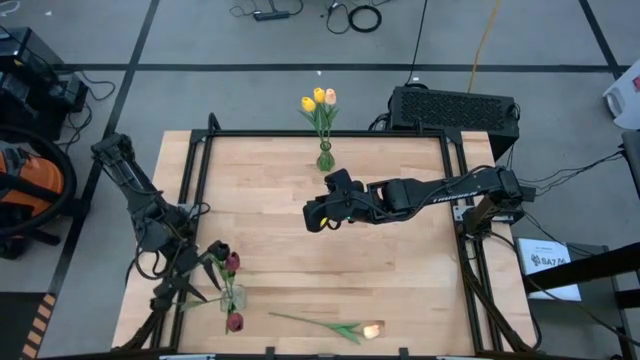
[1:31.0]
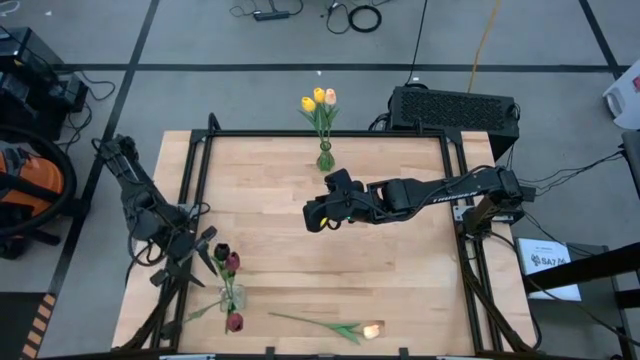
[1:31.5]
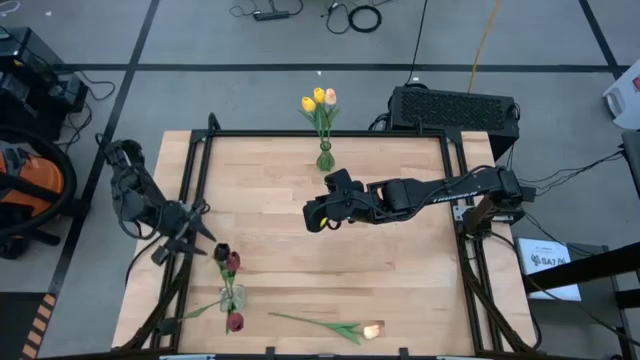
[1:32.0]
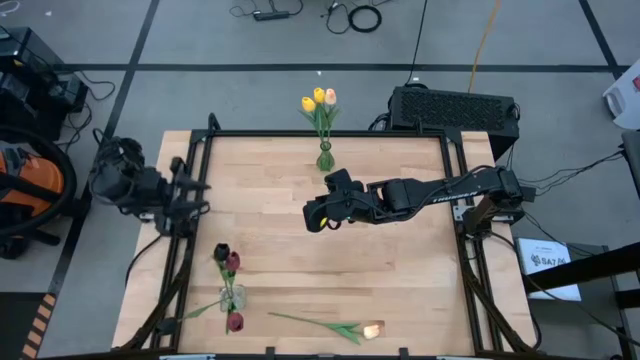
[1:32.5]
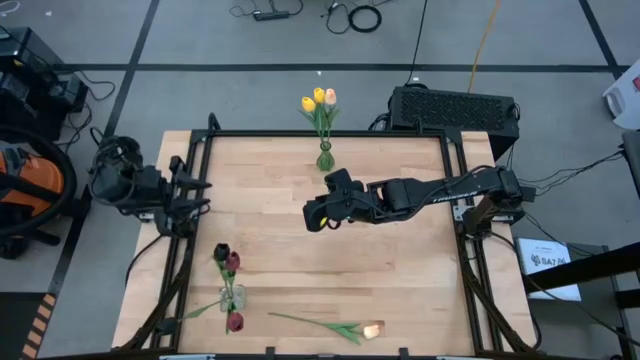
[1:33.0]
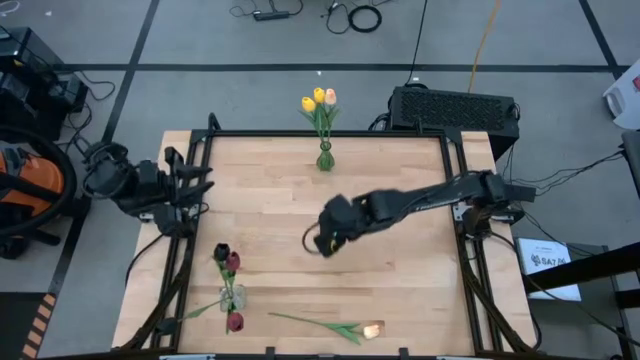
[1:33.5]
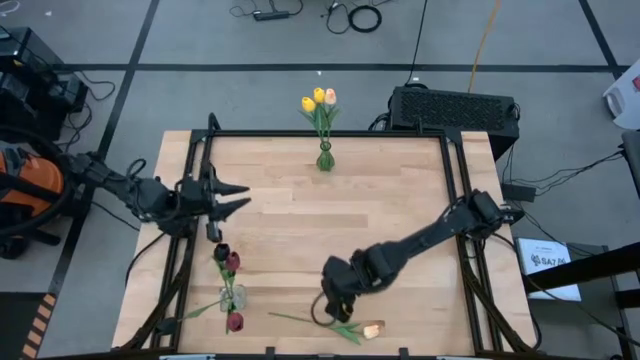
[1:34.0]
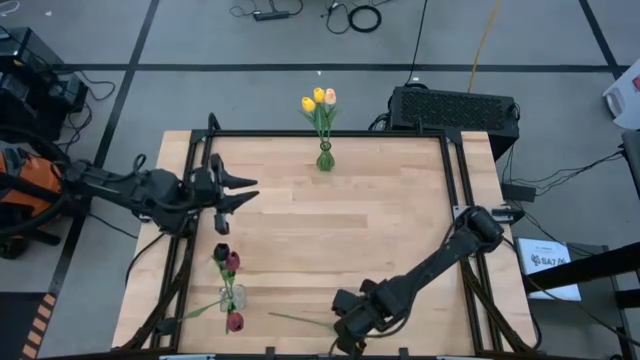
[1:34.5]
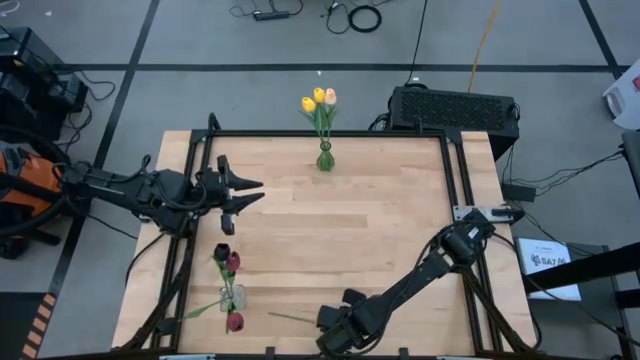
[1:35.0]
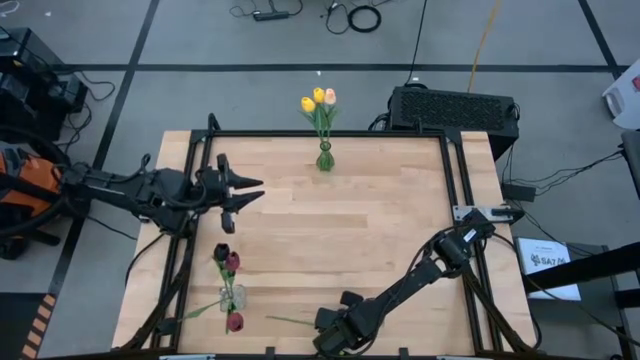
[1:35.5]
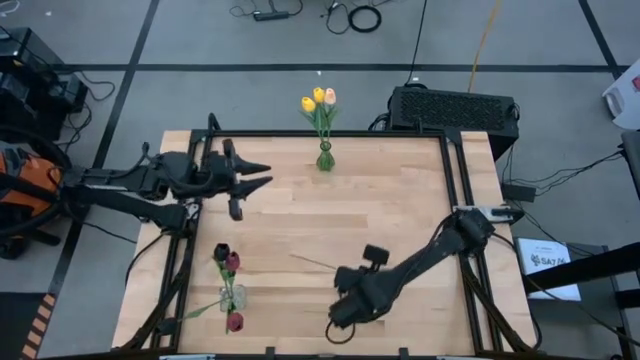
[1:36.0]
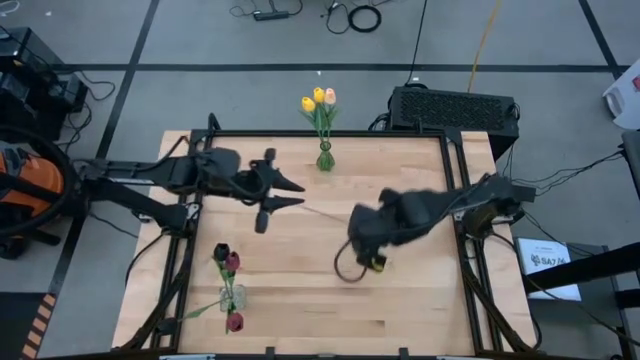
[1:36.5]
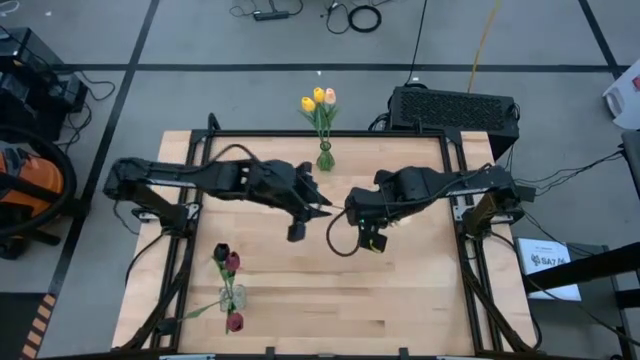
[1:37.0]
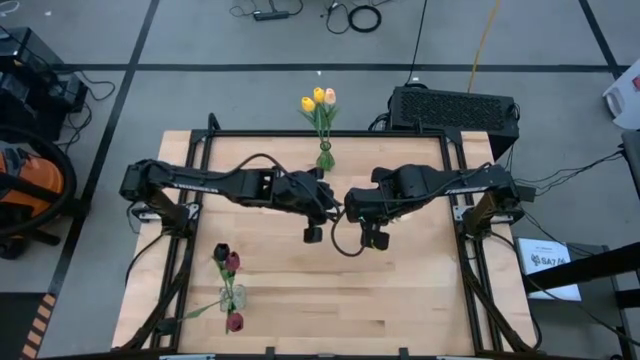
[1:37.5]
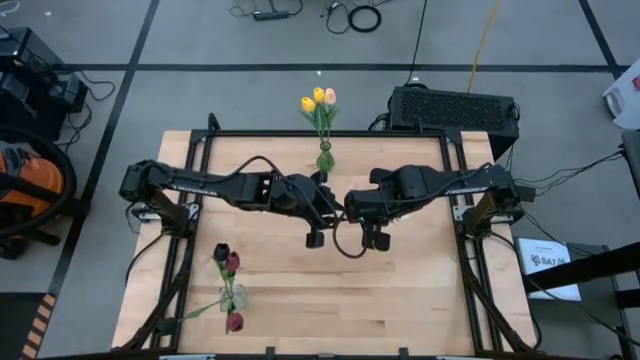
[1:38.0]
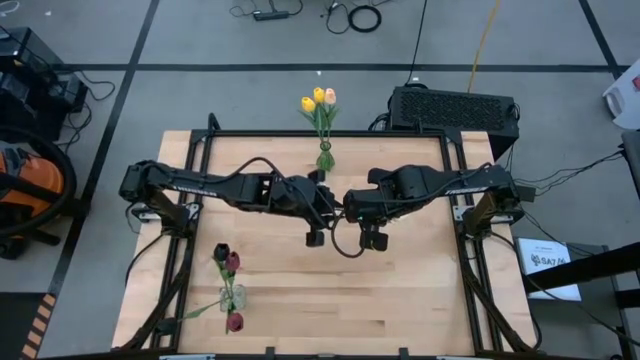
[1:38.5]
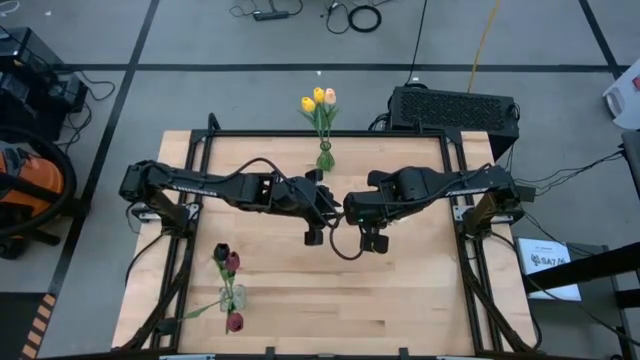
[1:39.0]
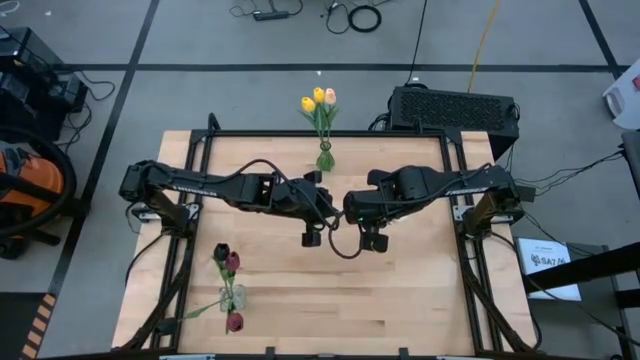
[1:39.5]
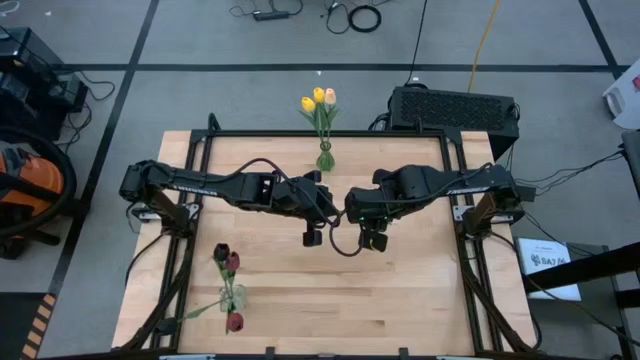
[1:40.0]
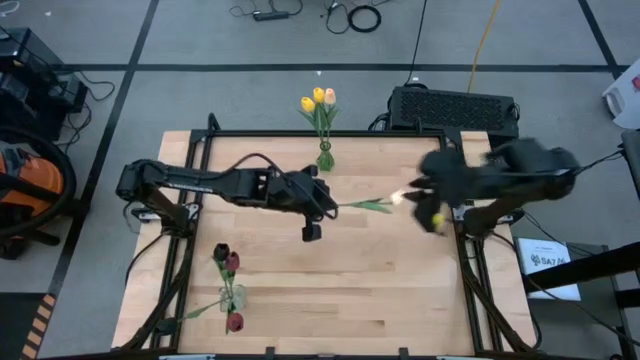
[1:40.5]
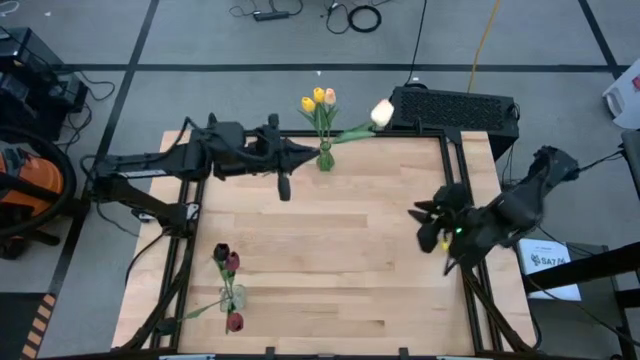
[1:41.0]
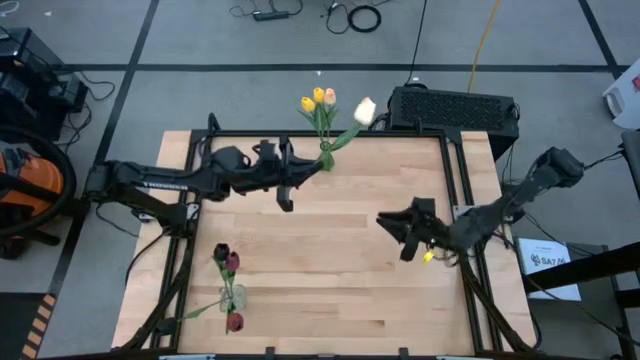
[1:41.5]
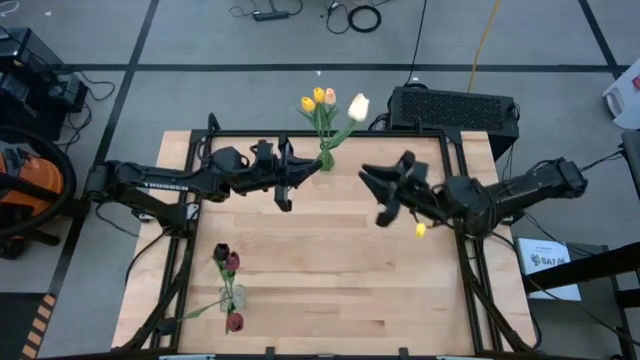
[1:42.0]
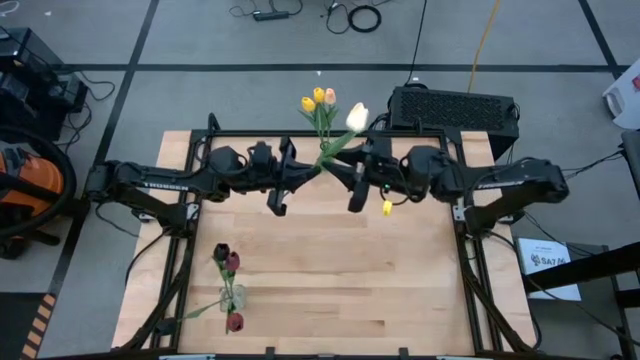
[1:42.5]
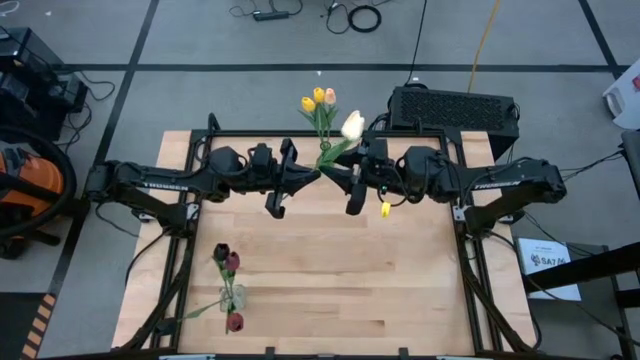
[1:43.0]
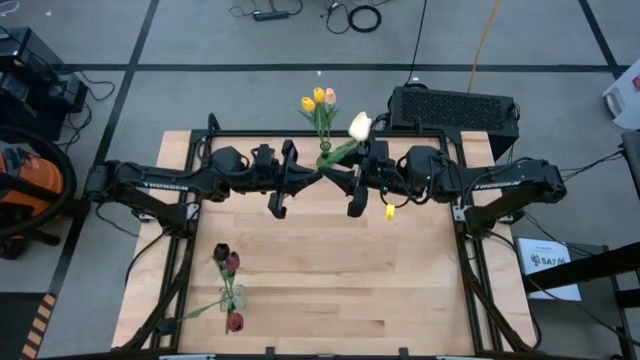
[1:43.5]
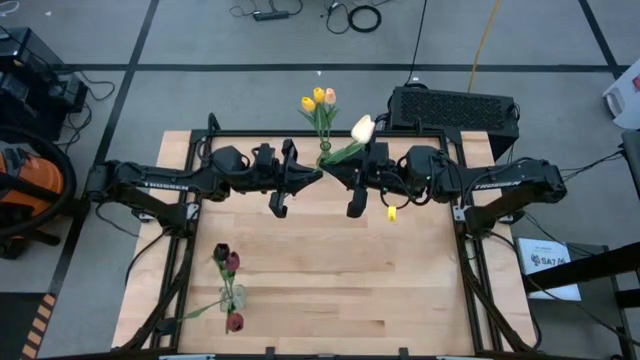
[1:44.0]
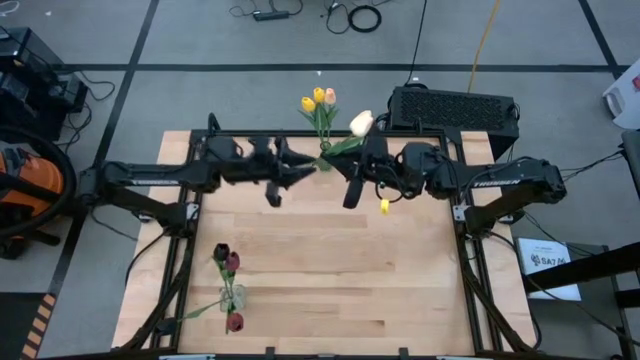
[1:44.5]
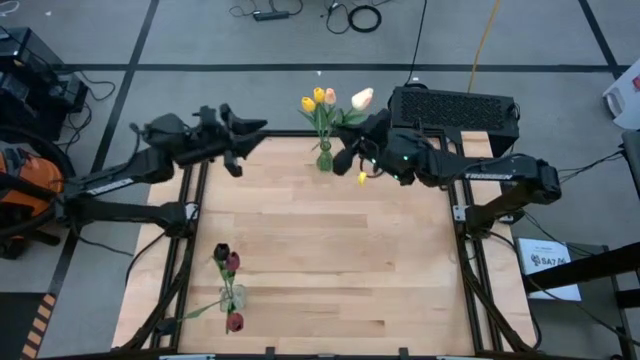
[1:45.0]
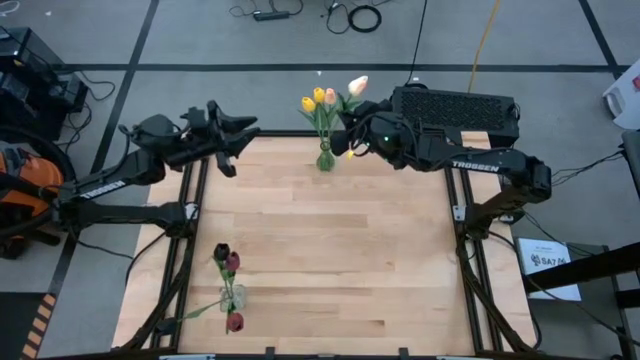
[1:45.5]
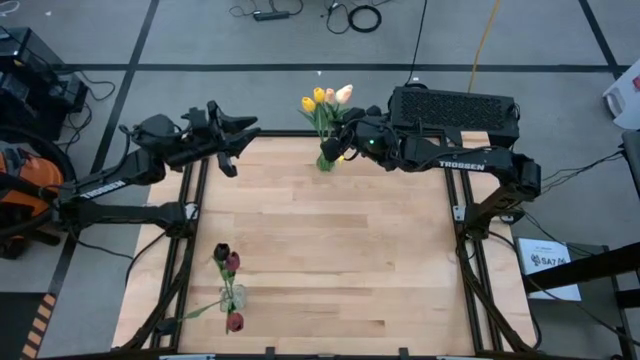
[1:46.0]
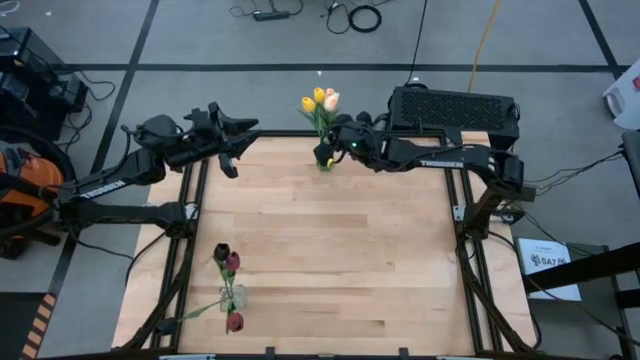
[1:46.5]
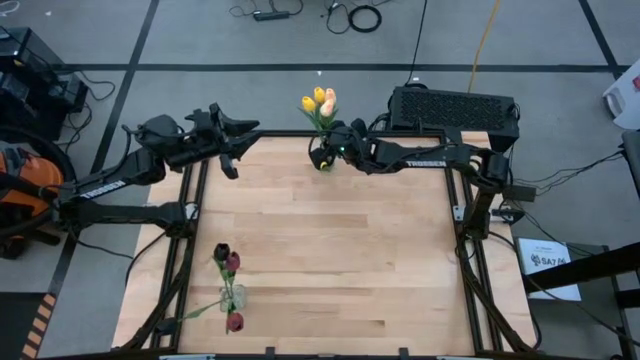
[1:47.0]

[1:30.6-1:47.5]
Task: Sort flowers into vase by color
Put the light yellow flower into the green vase

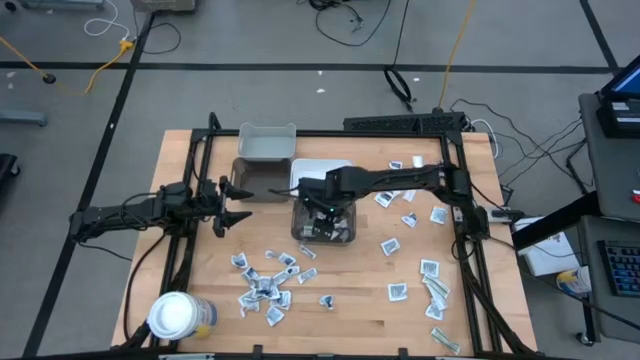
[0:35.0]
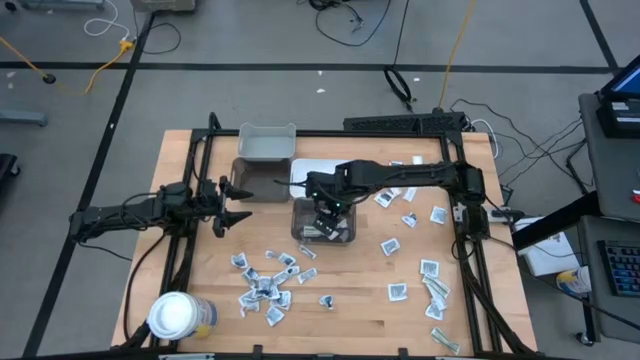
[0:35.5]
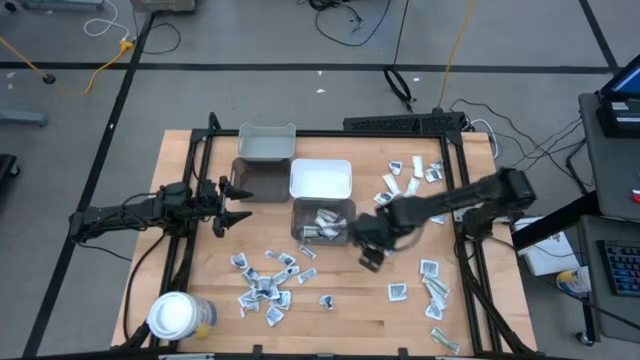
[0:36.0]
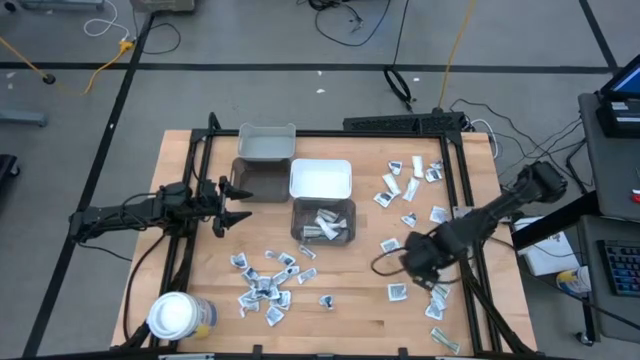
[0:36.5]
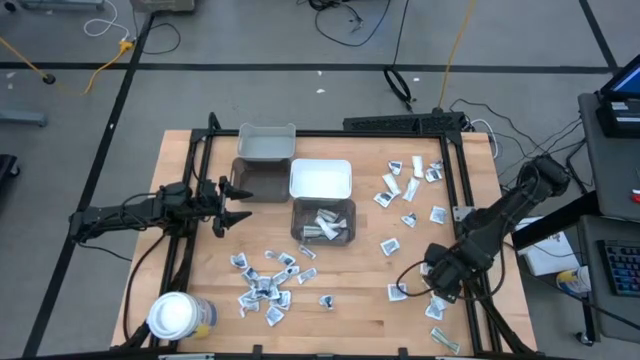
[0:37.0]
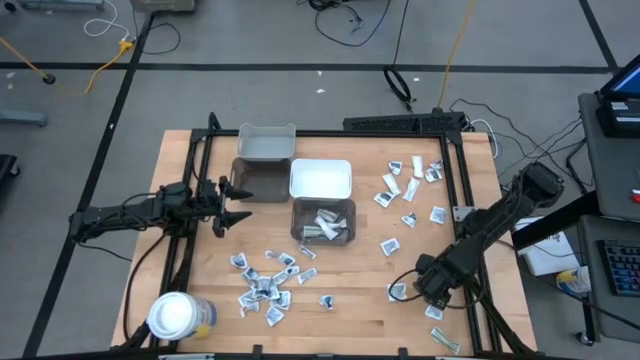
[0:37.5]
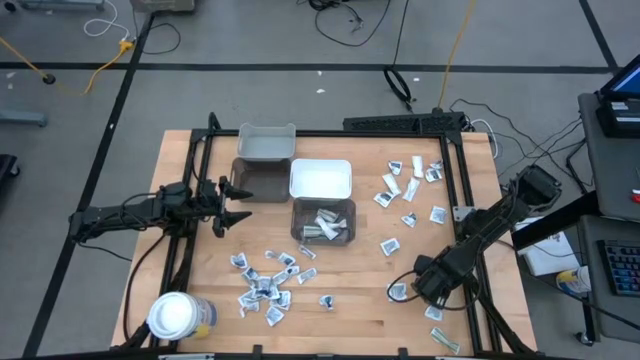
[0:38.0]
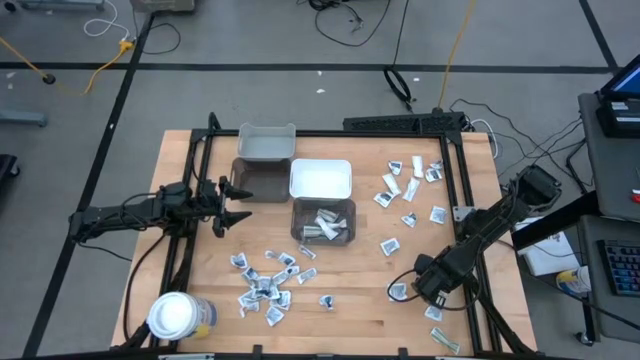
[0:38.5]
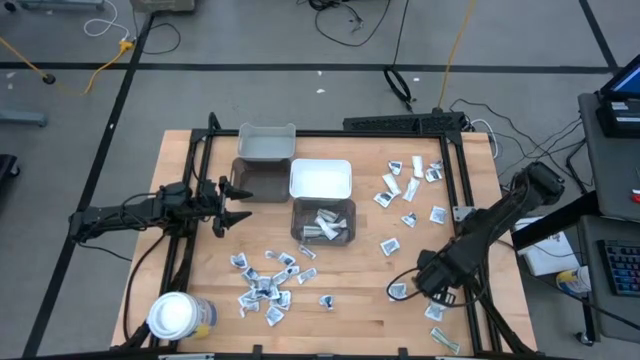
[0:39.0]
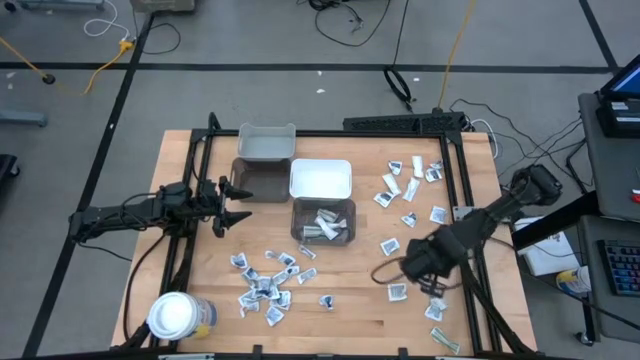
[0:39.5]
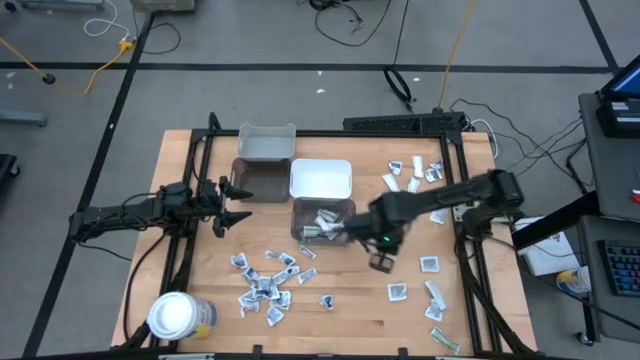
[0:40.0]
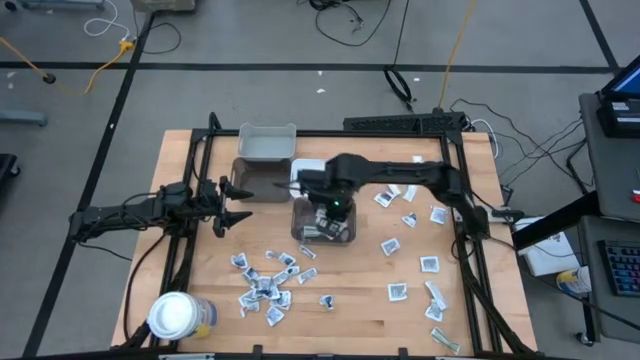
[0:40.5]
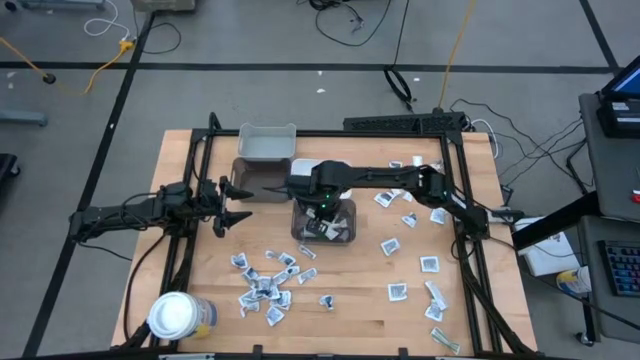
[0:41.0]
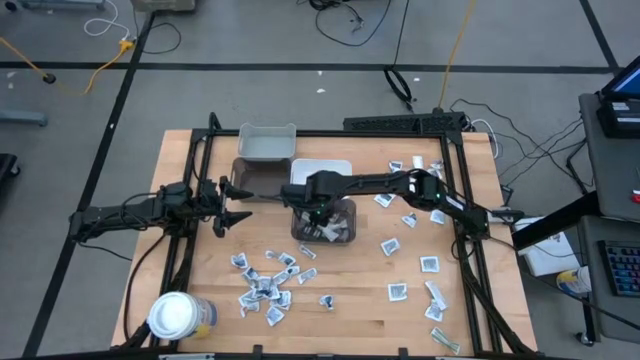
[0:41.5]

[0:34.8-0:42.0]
Task: Pick & Place First Aid Supplies
Put the green bandage pack into the right black bin
